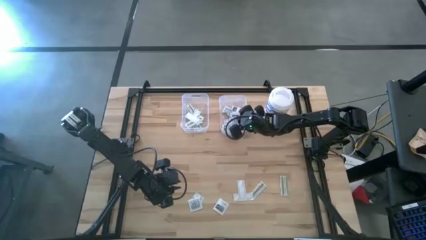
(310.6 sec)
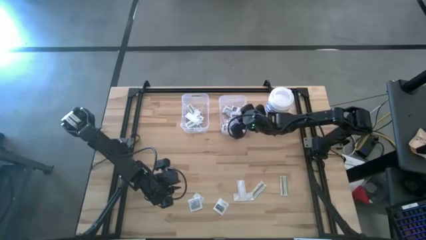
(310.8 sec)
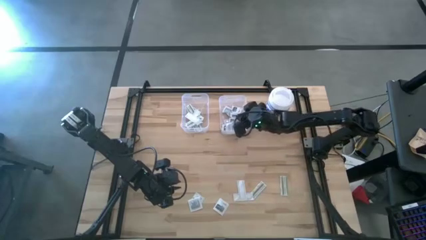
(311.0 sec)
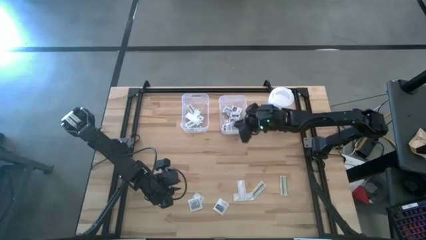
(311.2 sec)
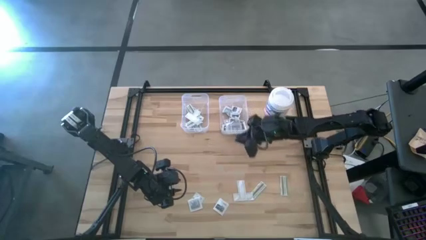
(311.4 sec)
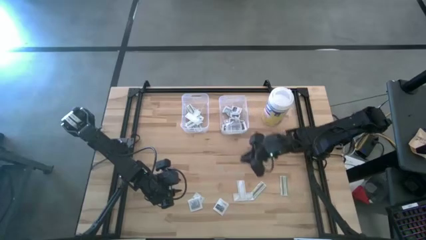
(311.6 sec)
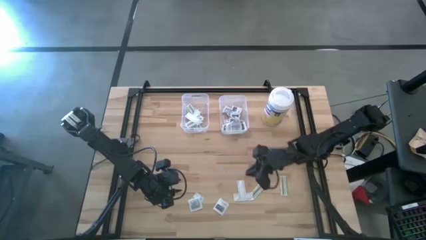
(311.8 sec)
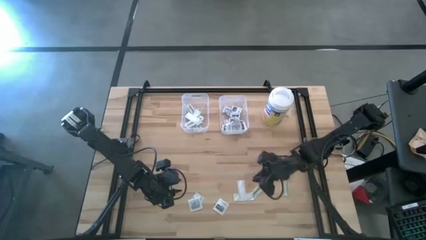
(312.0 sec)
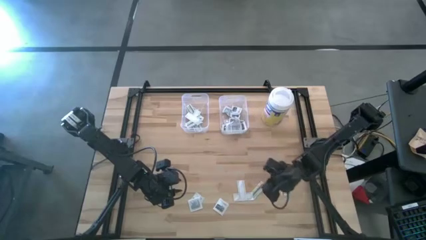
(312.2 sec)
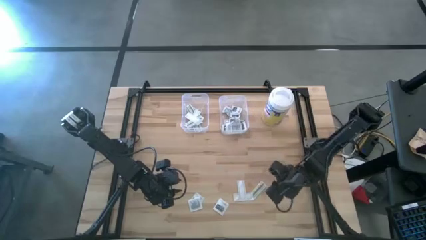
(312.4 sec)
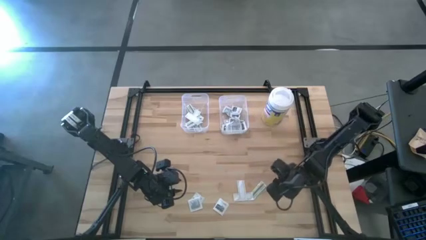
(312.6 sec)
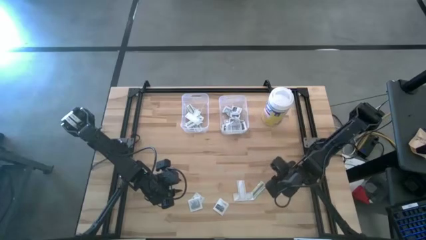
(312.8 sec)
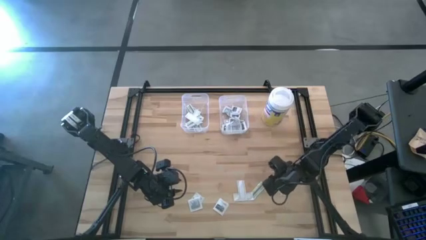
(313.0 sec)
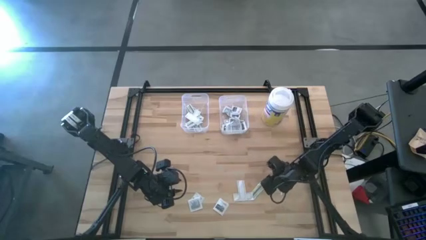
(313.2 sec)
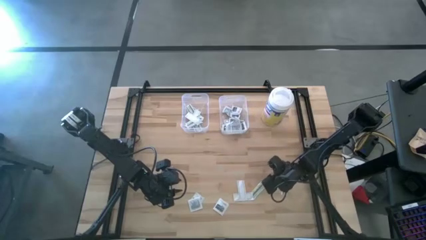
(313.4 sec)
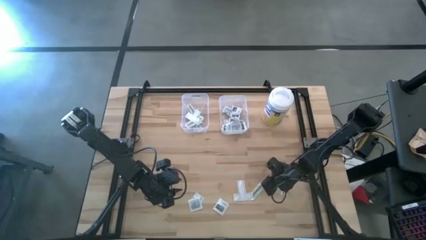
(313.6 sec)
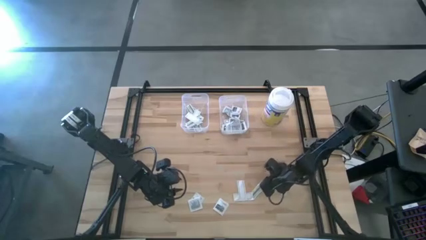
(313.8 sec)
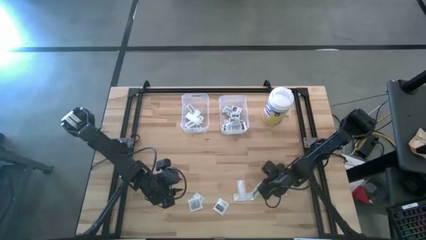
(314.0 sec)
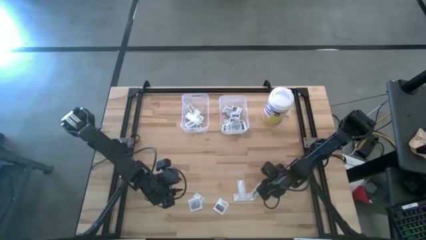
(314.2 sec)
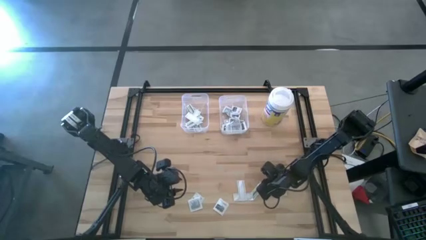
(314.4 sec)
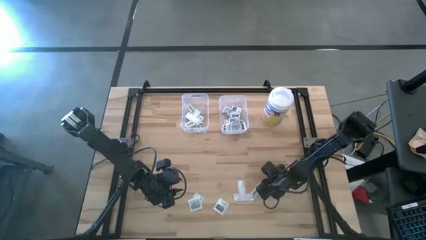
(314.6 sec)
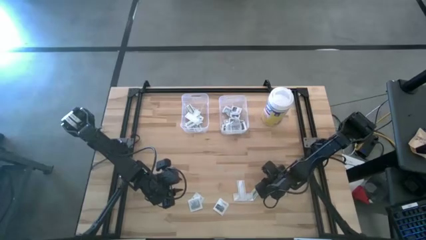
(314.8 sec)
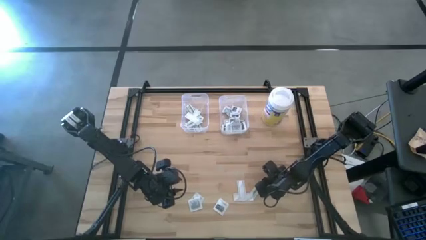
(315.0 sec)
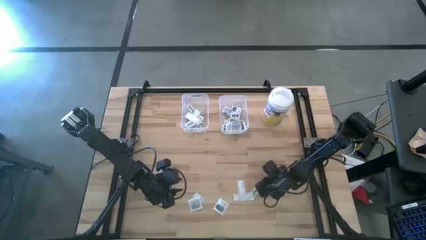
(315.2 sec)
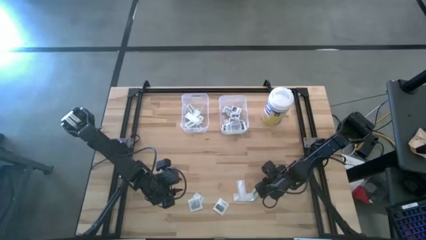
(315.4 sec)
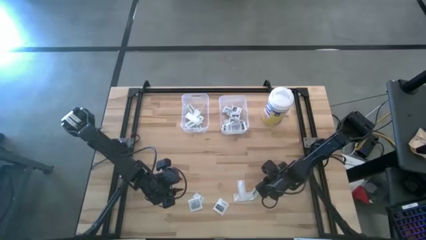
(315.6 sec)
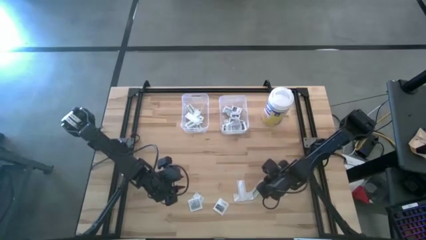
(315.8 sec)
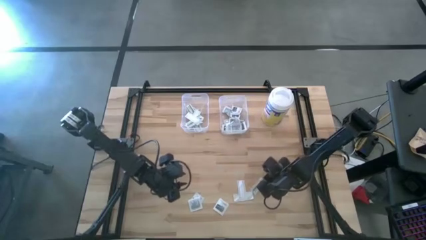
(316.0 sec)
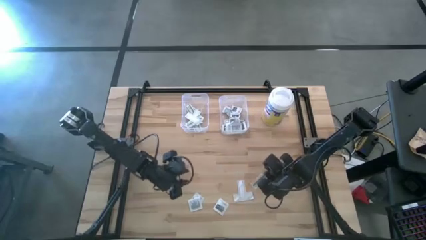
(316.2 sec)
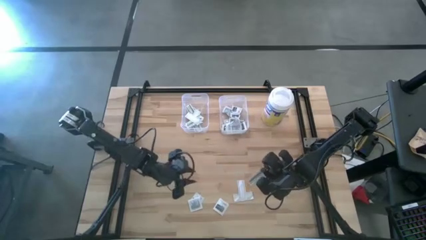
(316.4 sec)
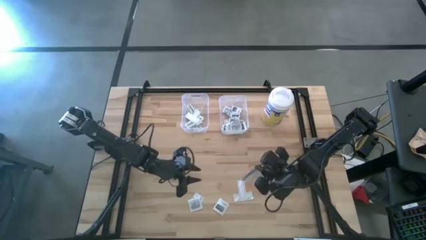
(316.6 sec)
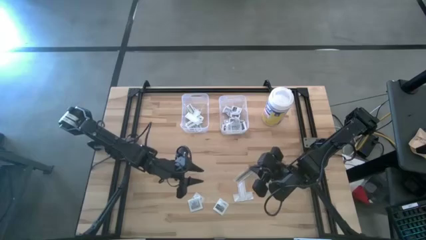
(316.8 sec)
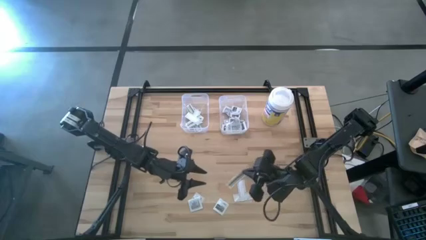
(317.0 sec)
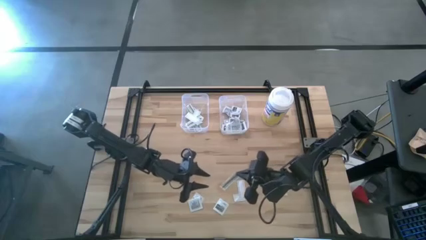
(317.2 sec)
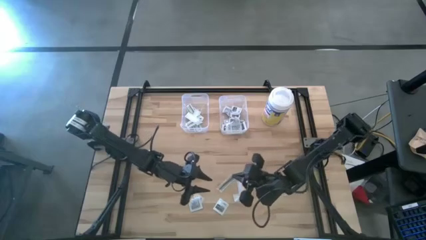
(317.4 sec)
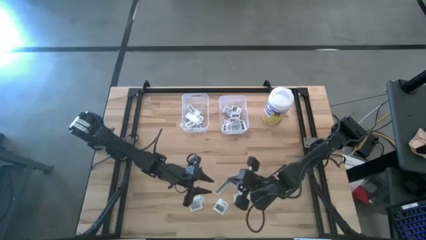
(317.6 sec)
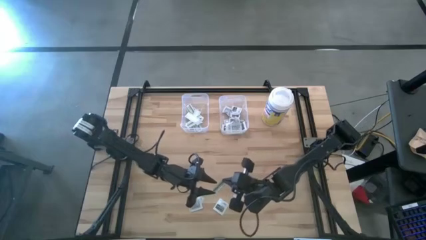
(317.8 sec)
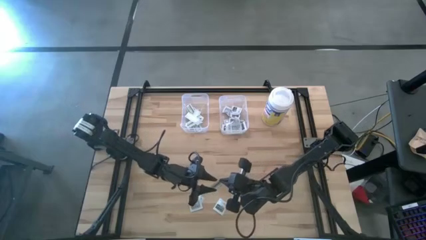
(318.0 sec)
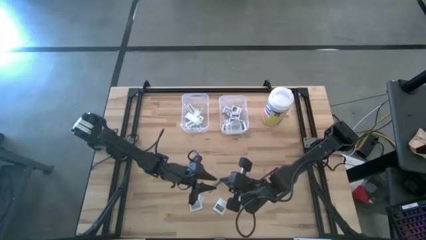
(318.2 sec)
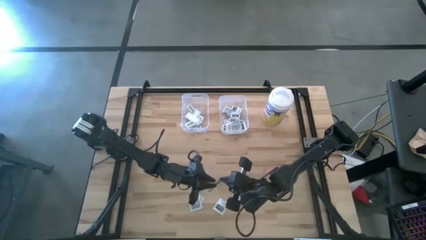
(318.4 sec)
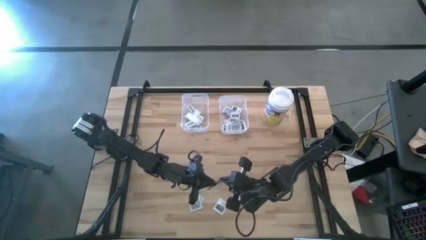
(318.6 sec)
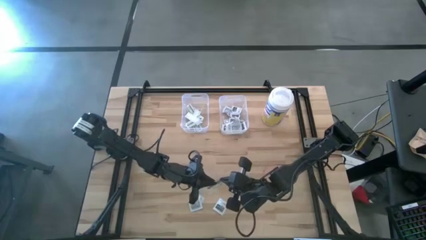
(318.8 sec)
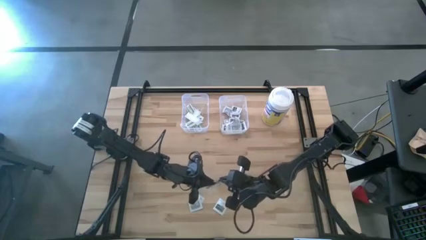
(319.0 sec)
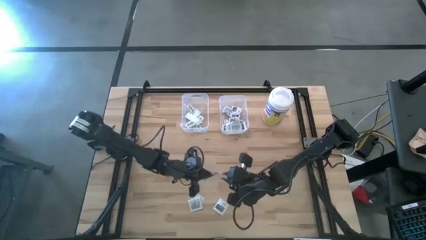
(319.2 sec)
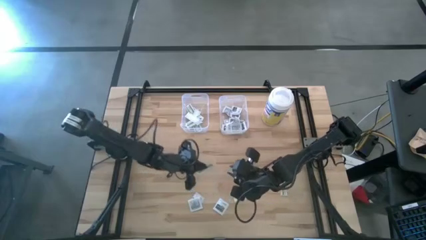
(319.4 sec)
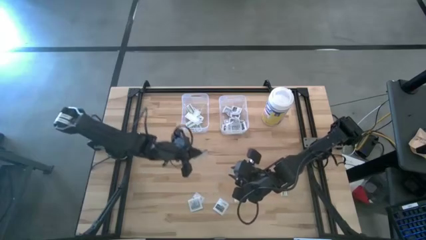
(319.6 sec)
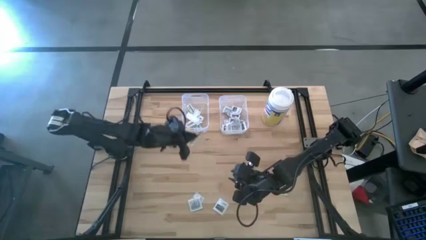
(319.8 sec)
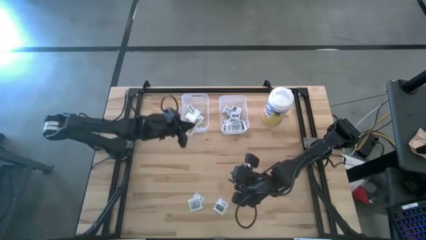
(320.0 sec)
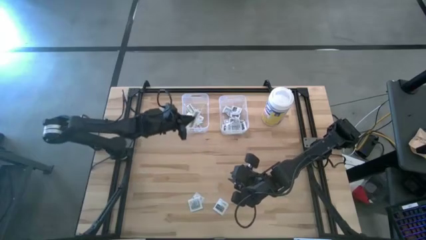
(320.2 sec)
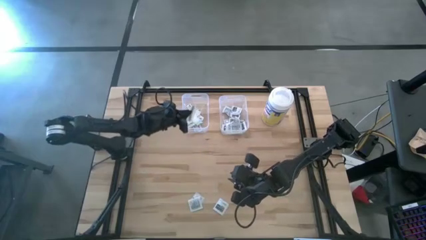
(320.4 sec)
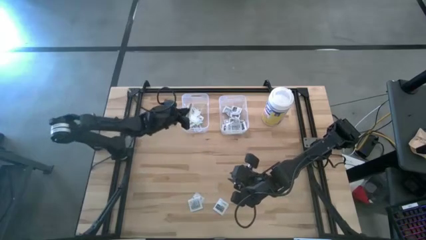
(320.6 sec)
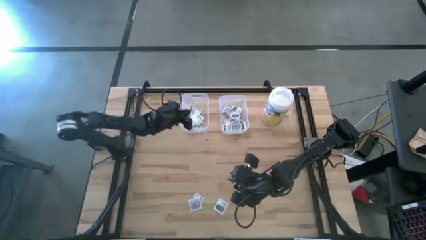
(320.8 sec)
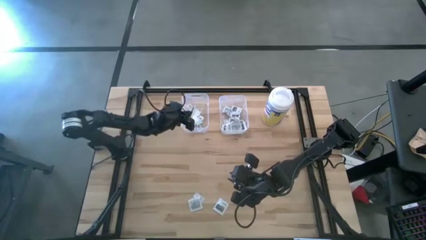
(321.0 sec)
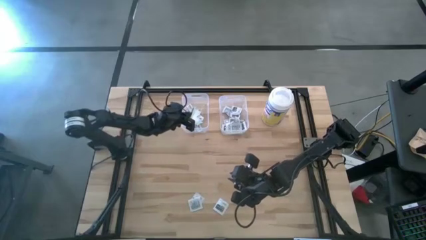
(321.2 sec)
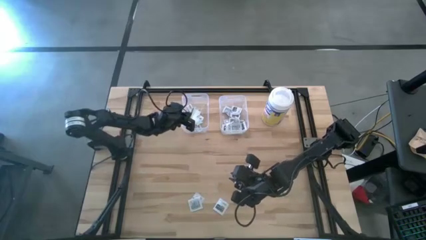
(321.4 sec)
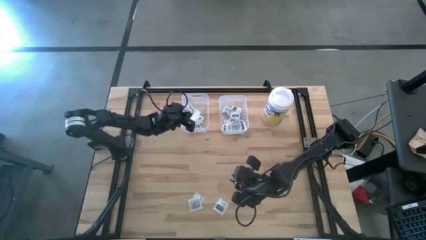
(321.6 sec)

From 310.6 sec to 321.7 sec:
Task: Pick & Place First Aid Supplies
Put the green bandage pack into the left transparent bin

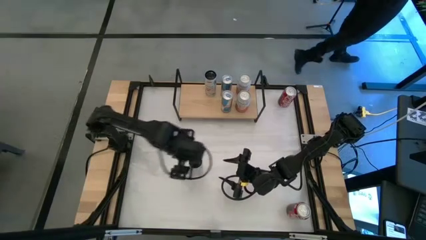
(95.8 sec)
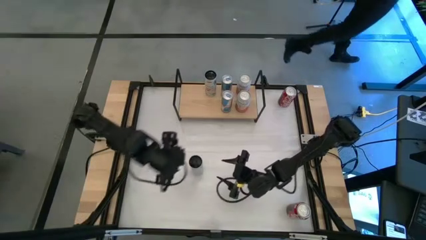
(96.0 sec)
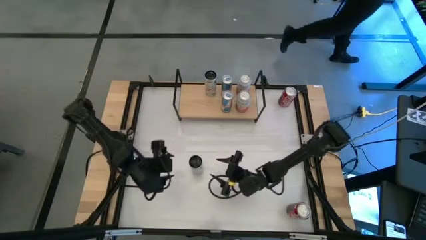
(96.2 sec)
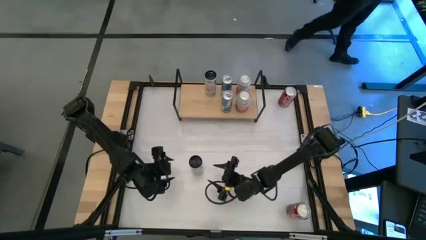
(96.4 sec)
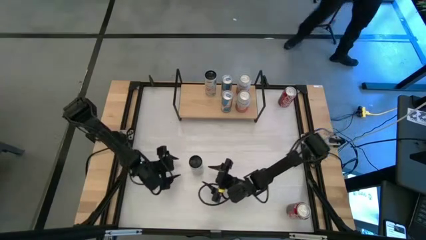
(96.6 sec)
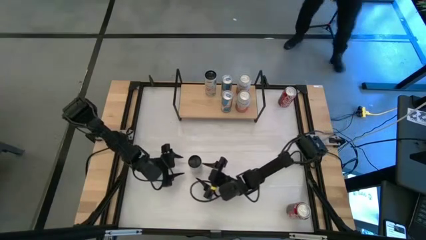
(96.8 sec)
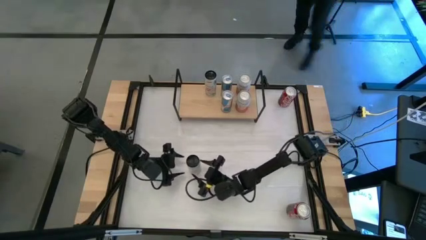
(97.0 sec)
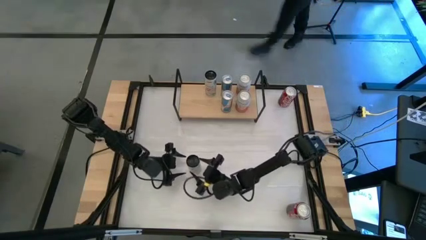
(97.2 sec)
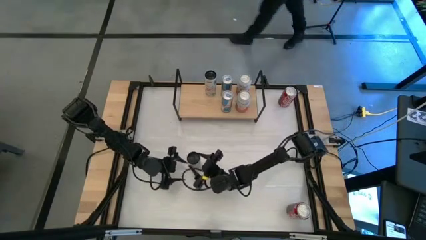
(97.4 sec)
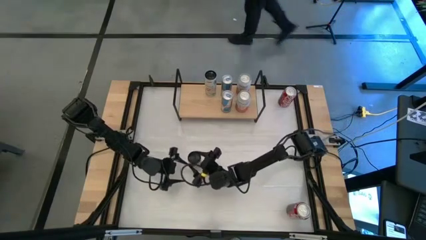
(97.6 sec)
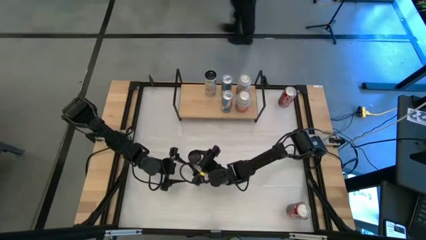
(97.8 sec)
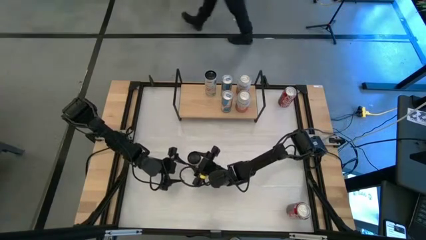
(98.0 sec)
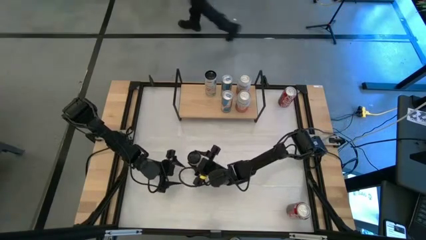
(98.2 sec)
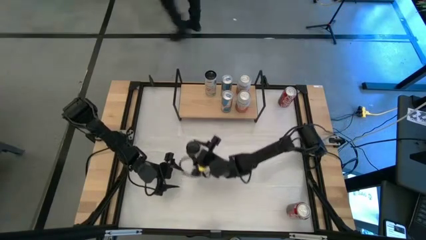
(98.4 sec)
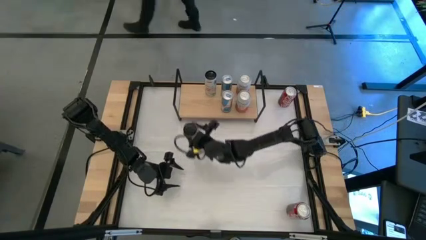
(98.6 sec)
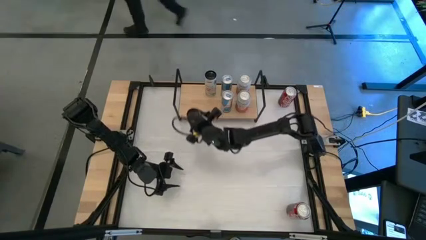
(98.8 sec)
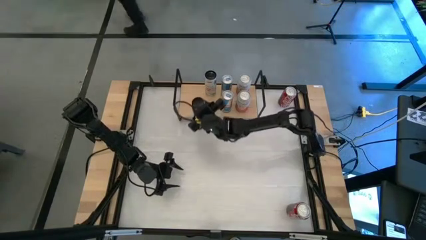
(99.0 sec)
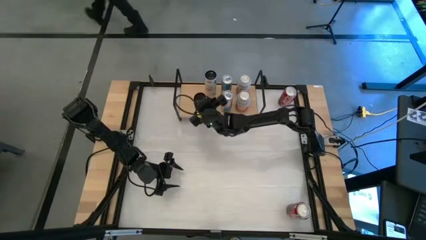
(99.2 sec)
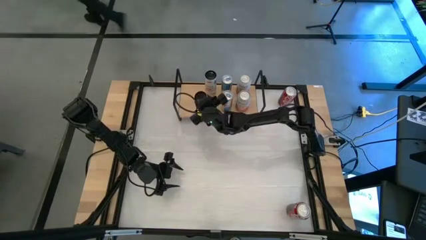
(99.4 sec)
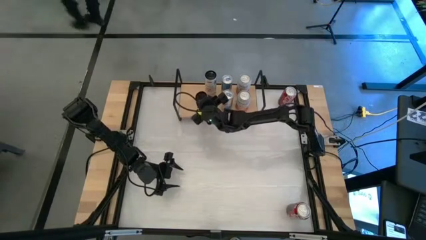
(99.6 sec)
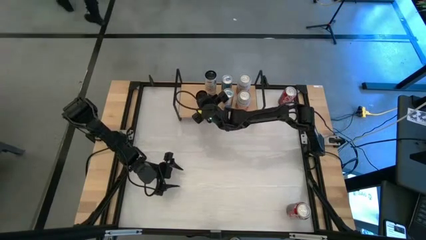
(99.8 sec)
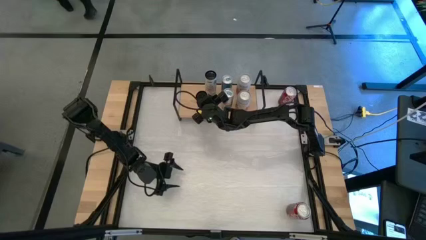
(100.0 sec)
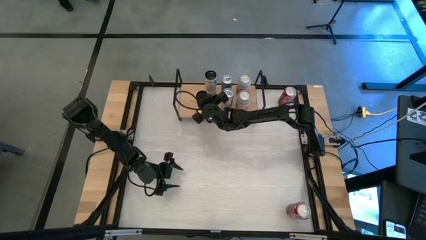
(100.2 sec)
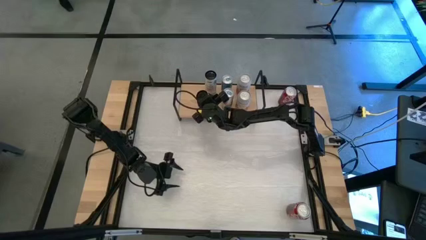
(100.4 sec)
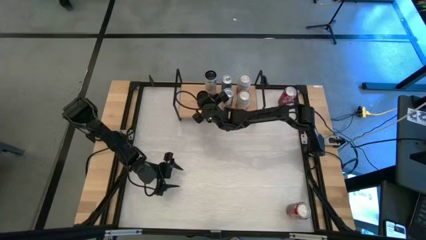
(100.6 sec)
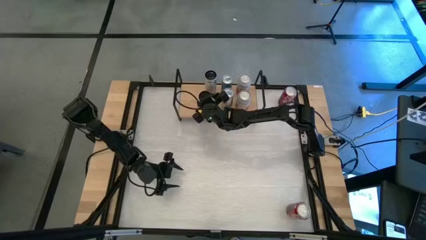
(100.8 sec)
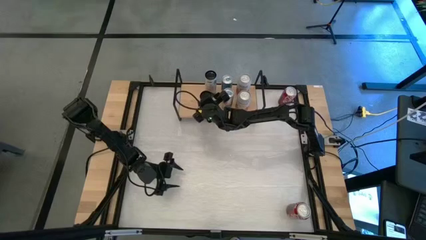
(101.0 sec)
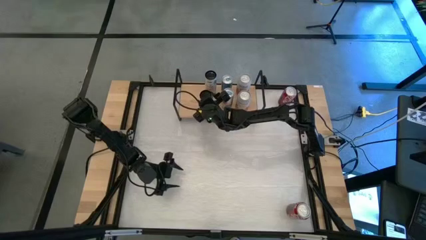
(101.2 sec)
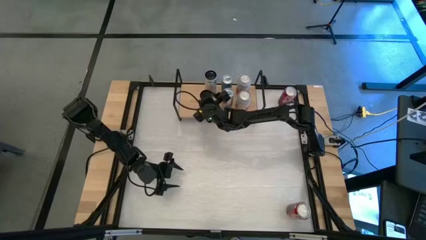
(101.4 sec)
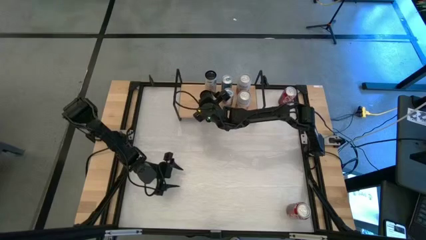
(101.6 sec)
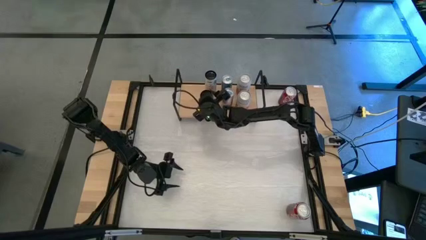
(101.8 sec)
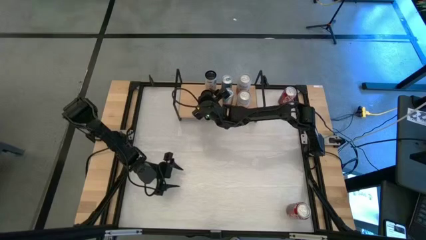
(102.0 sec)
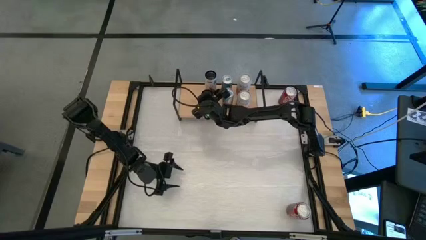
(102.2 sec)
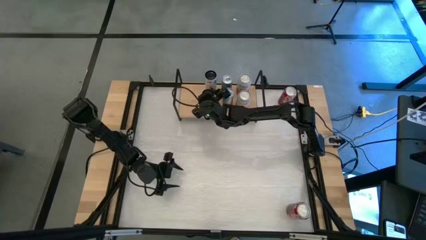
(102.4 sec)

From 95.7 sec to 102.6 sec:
Task: Place canned beverage on shelf
Put the white soda can on the shelf
